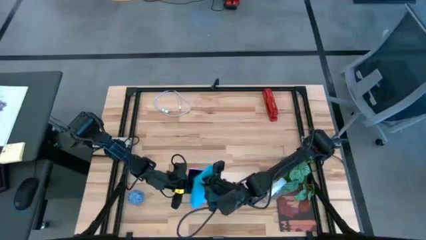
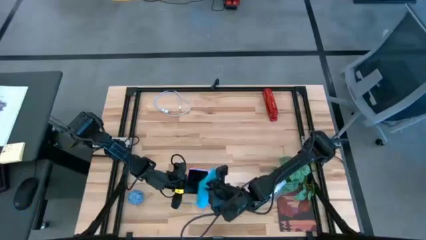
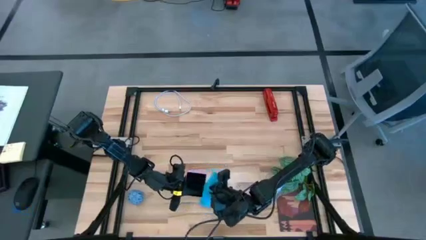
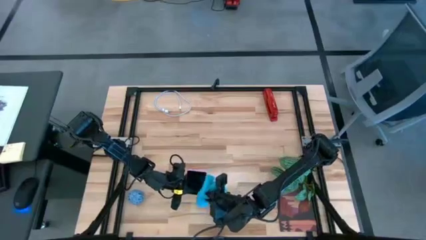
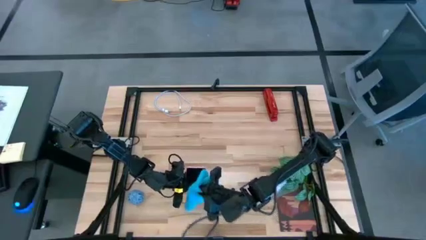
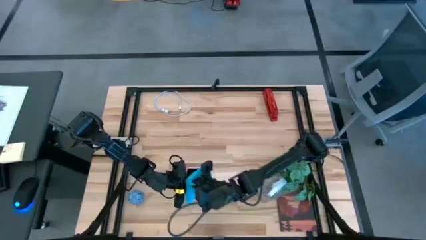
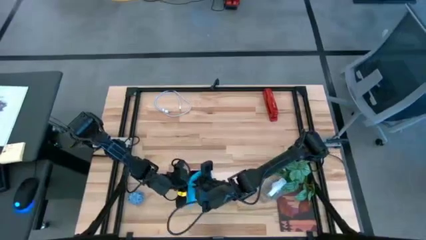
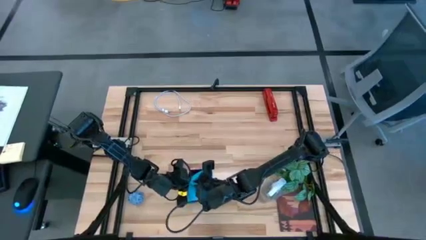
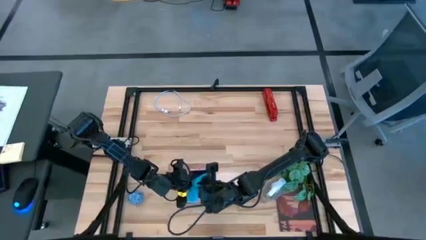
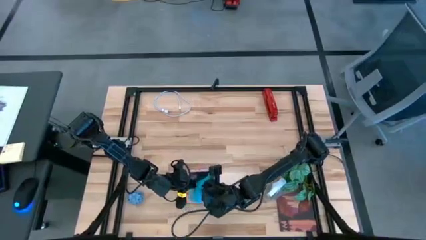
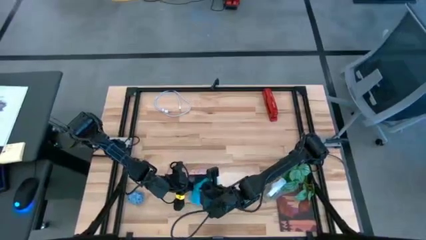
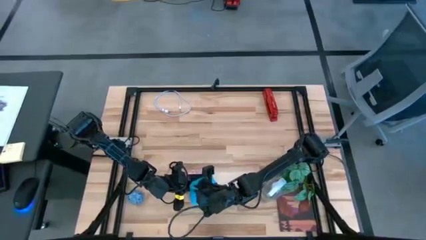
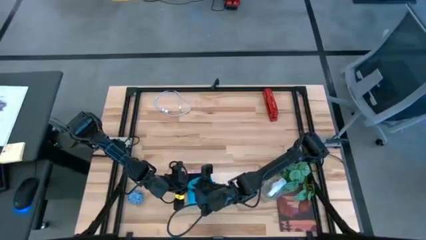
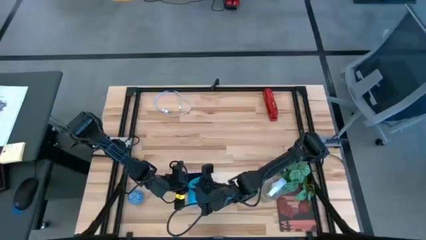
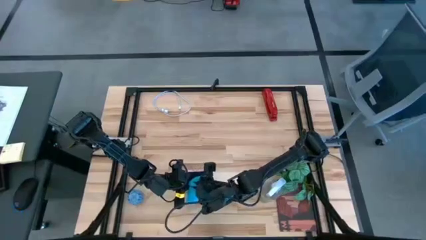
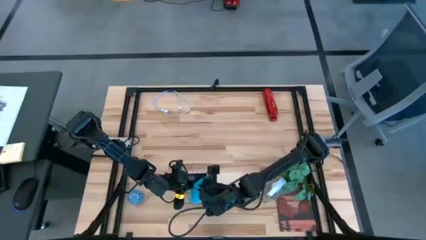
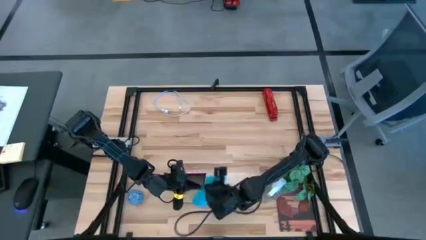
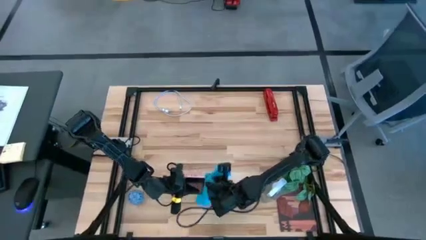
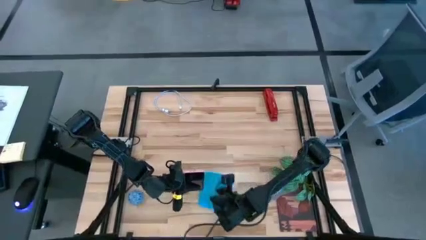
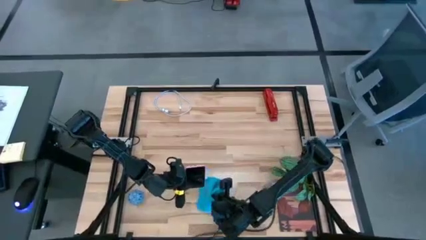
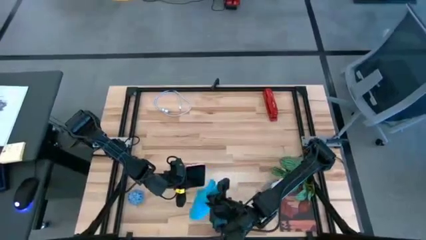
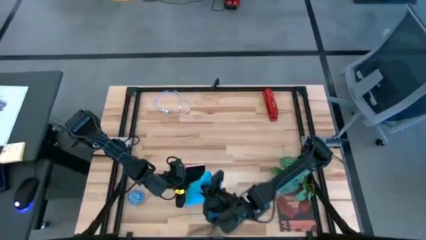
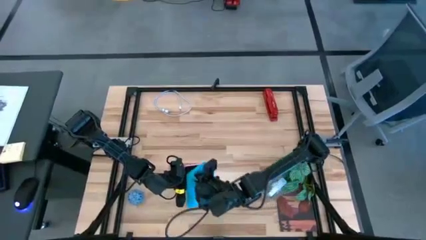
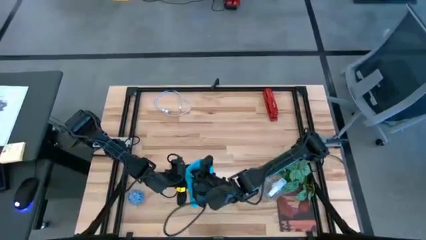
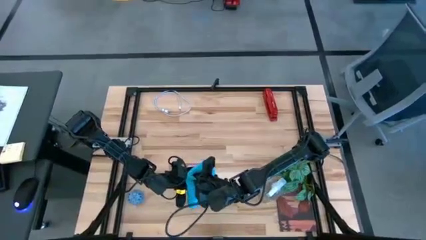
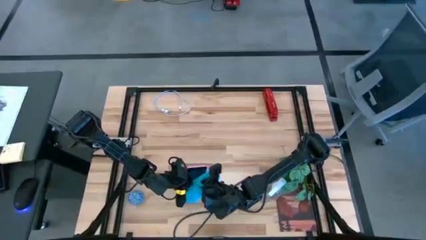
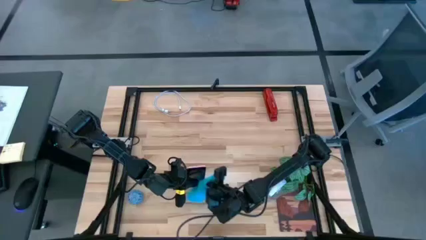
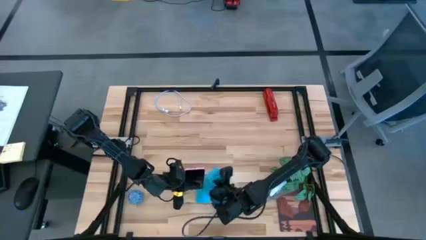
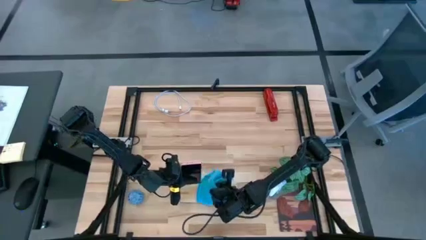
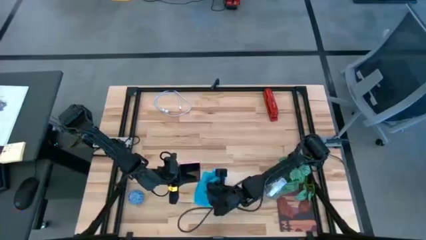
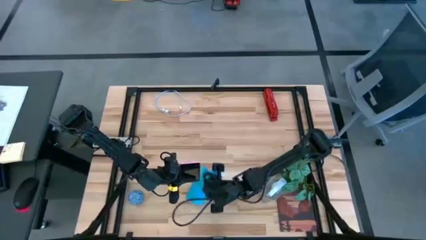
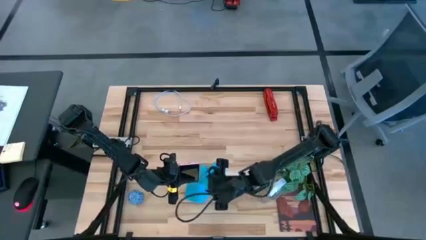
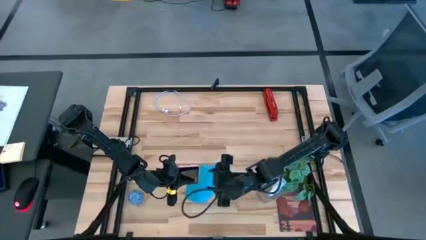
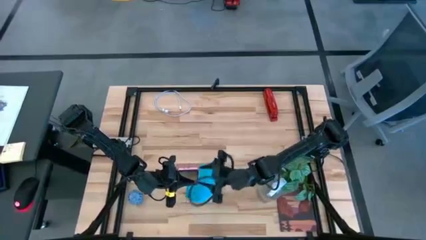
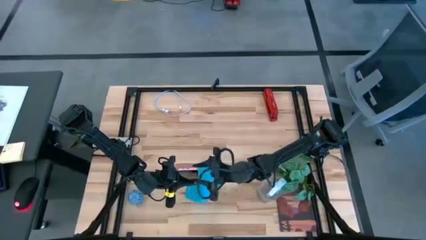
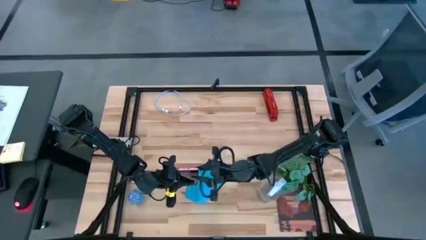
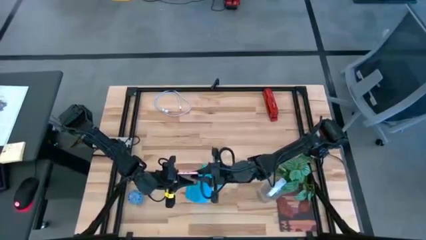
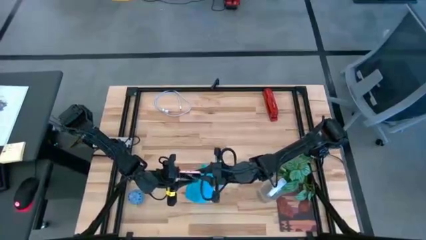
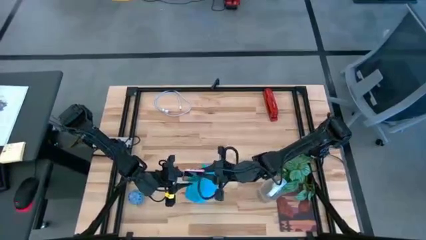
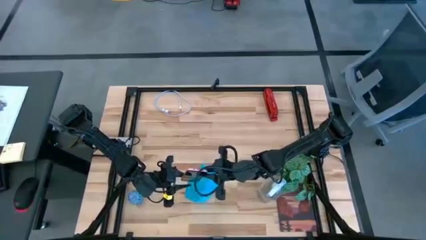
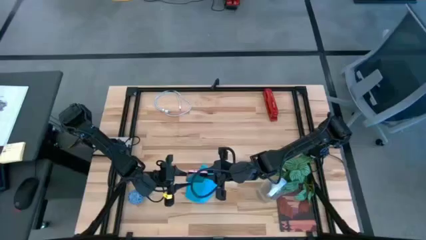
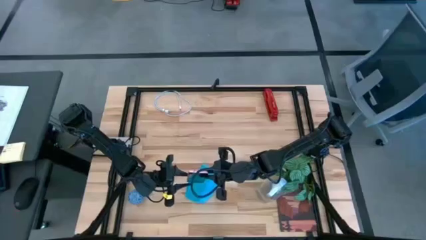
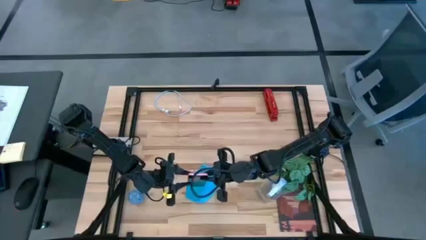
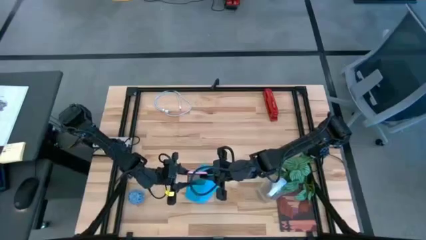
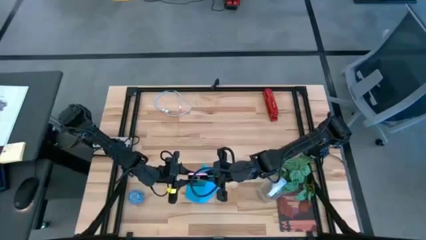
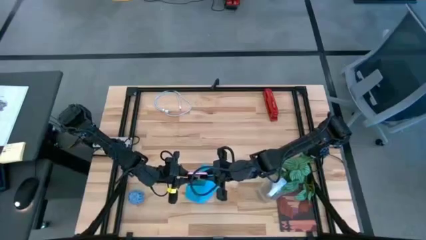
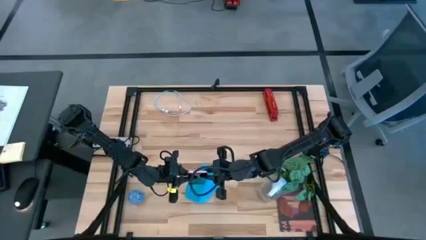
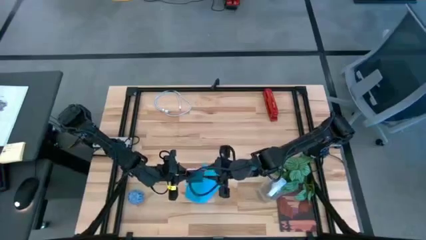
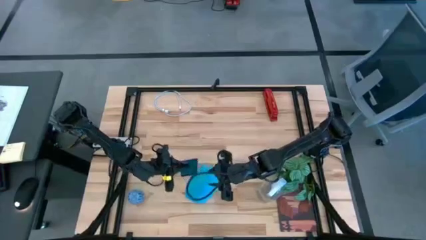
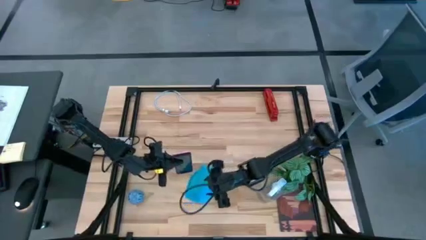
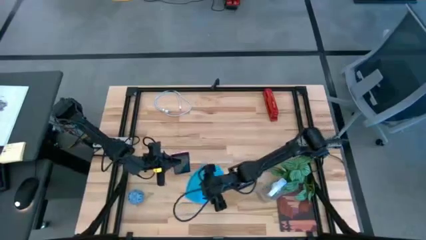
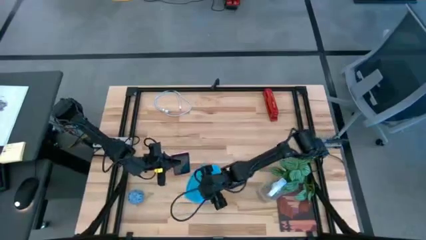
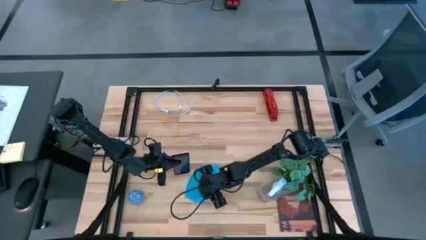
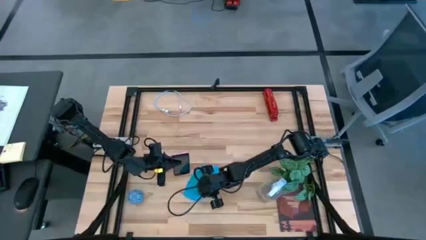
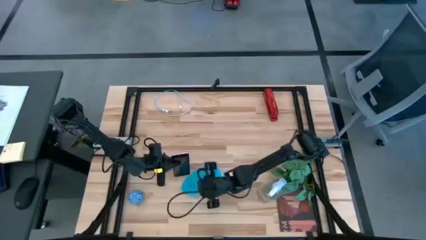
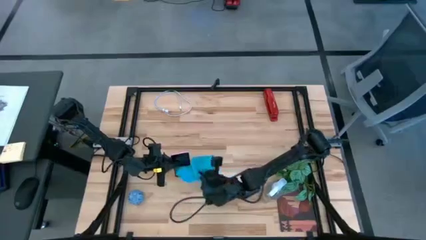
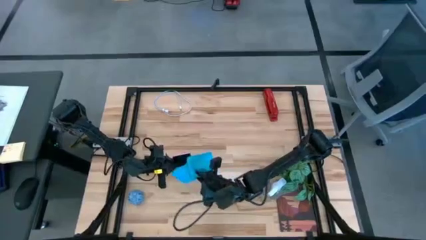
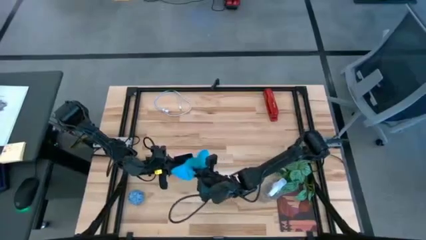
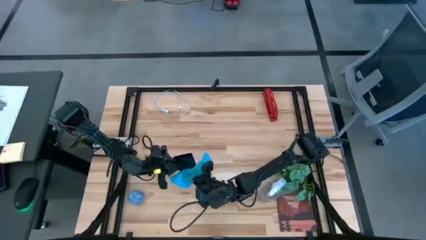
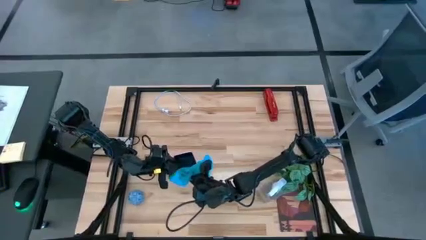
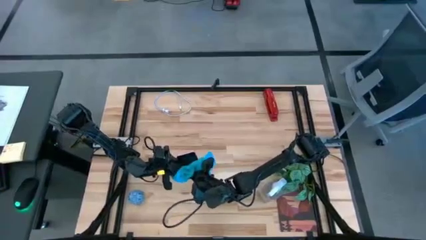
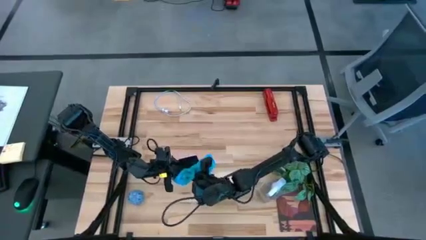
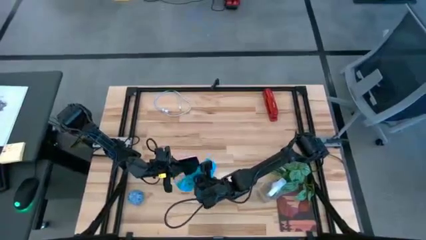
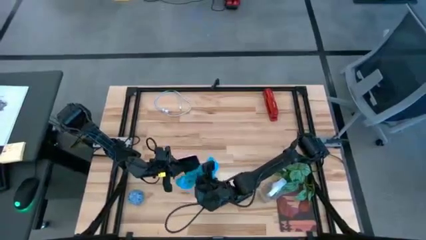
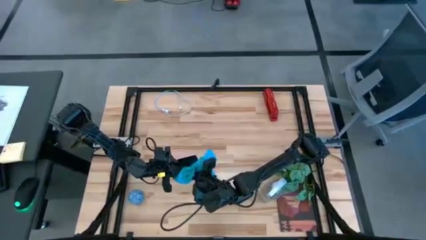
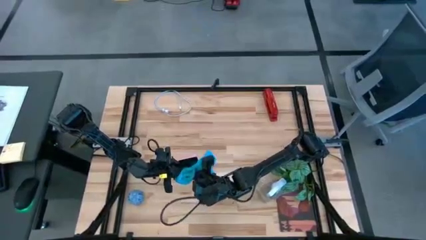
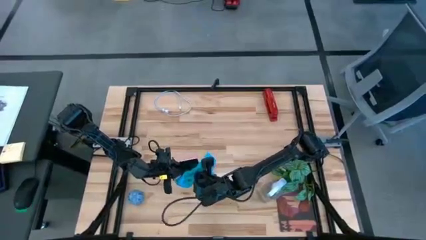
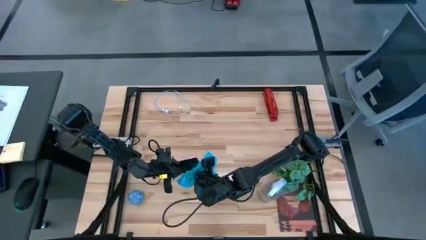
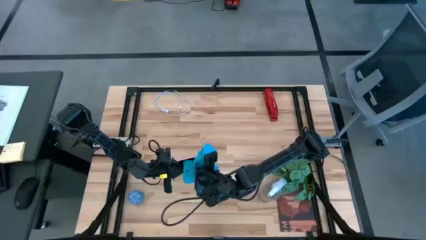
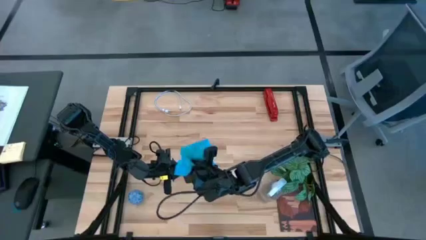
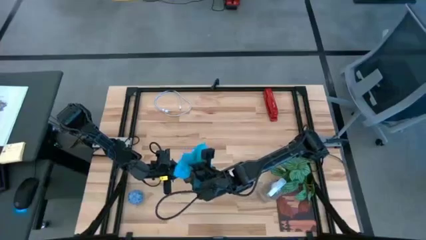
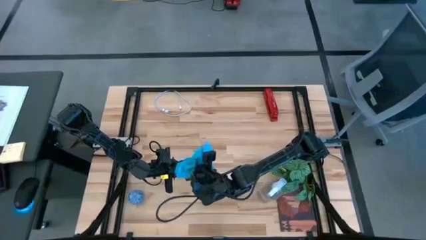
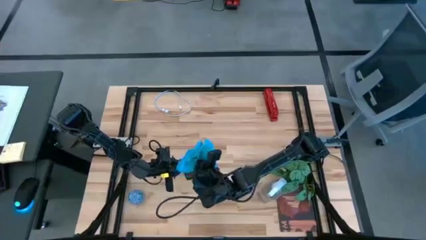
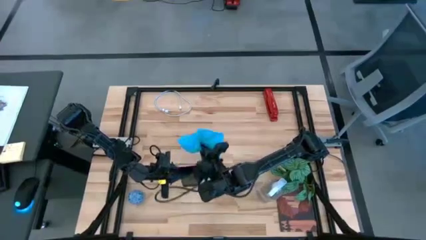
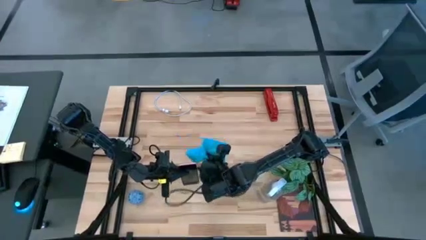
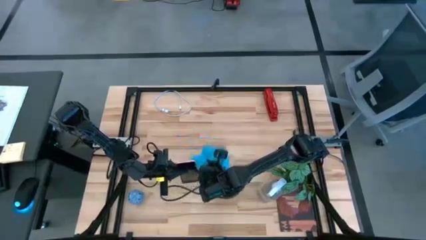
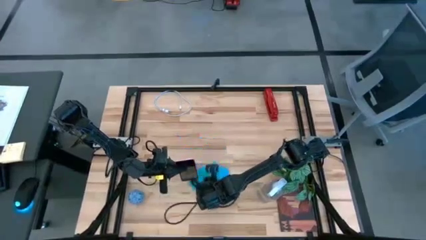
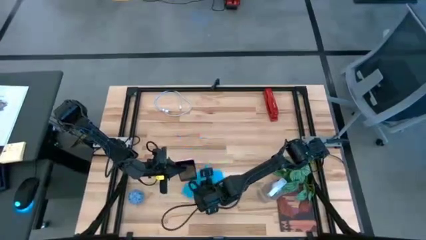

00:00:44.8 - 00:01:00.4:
Task: Apply microfiber cloth
Wipe the front of the cellphone with the blue microfiber cloth
